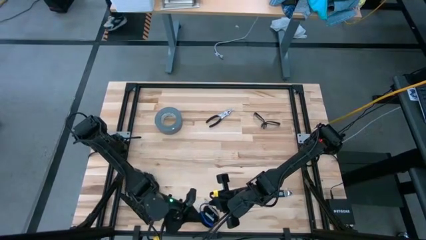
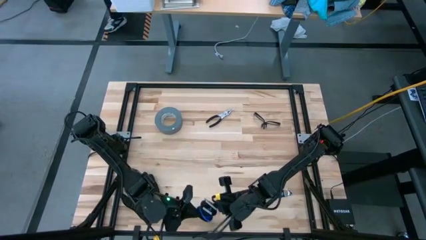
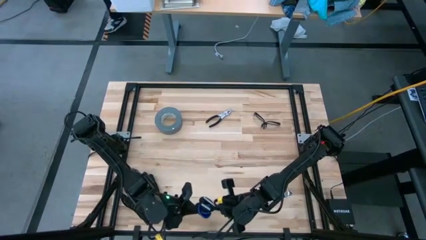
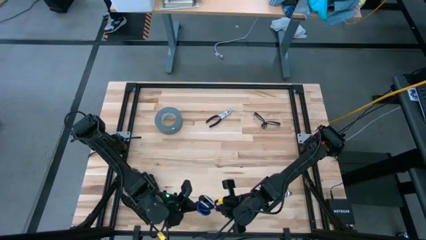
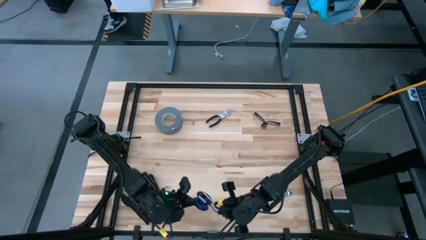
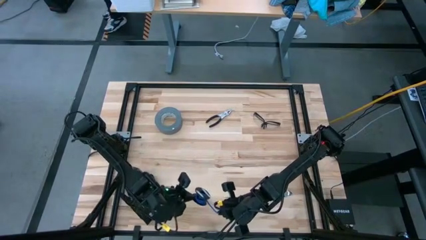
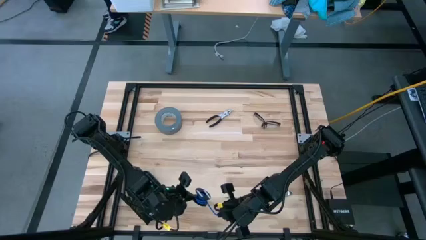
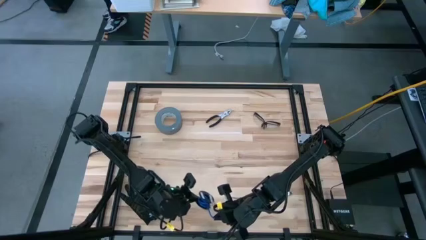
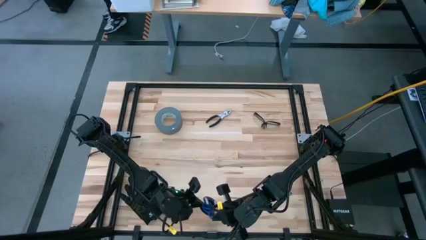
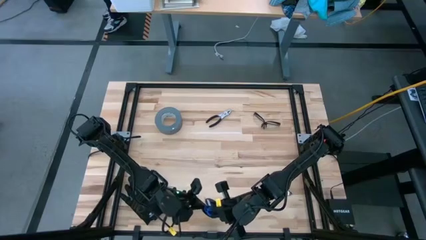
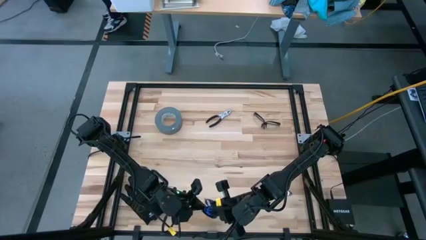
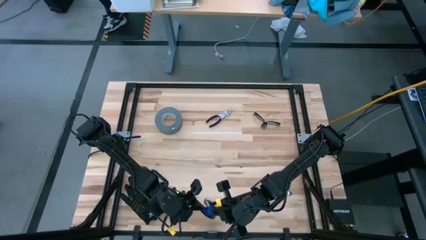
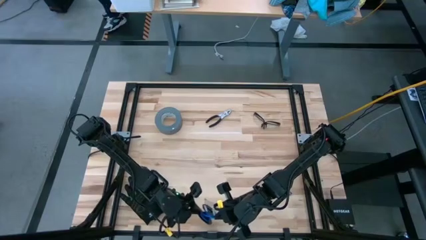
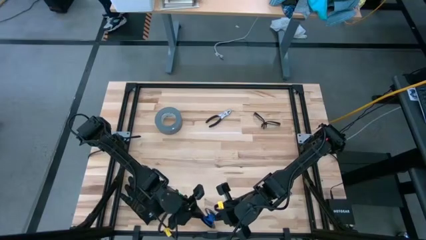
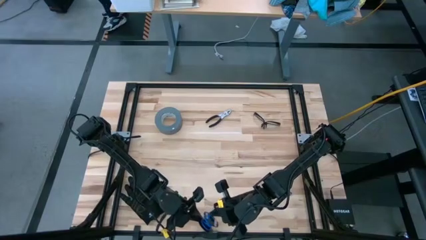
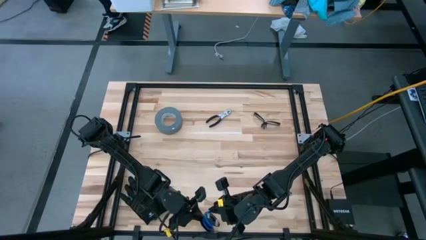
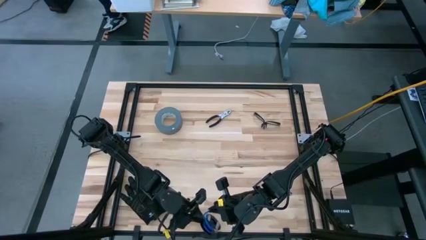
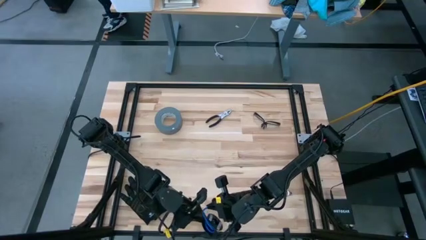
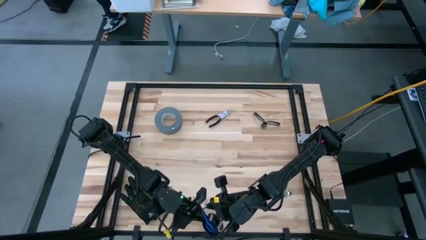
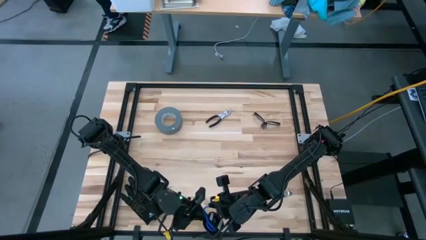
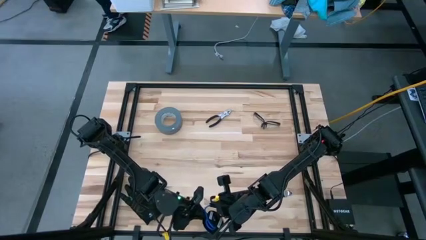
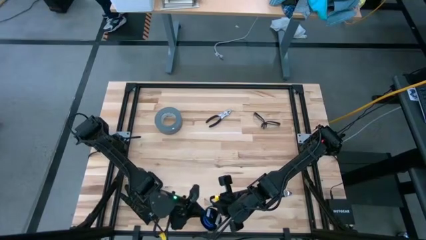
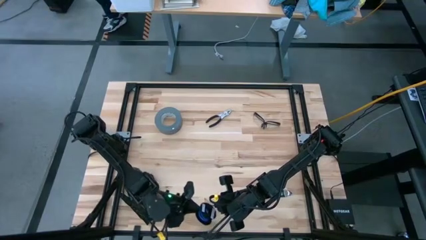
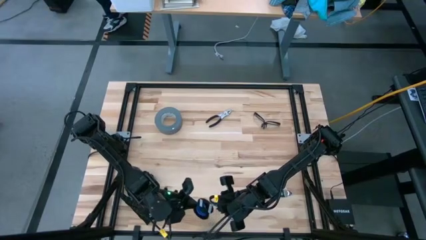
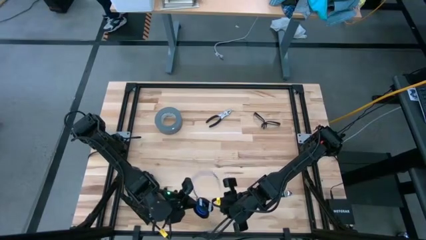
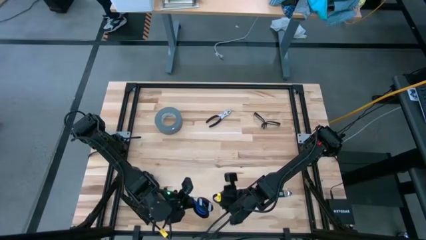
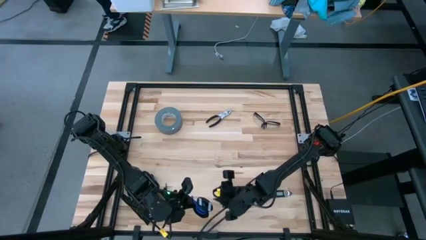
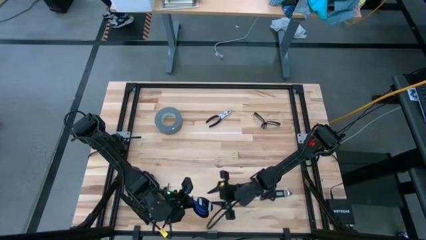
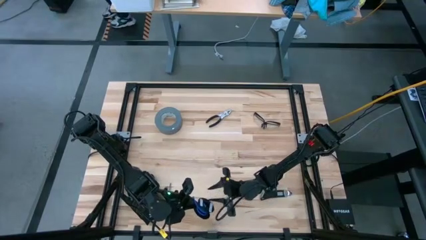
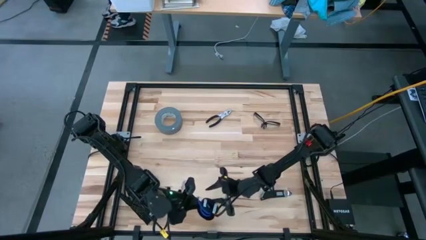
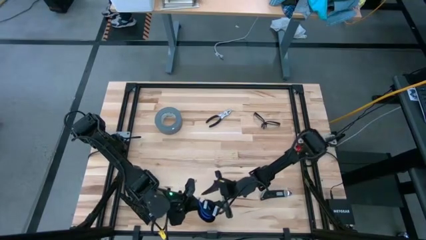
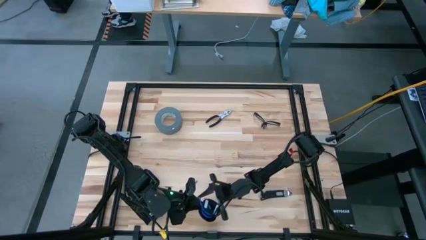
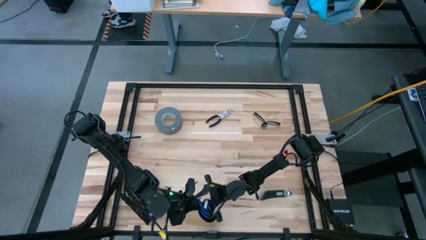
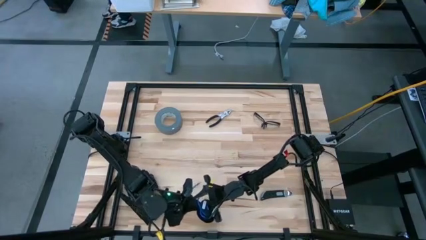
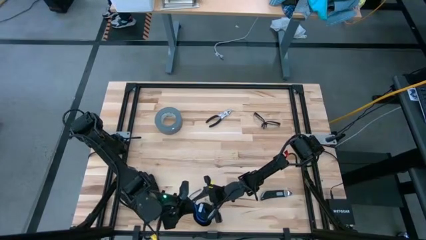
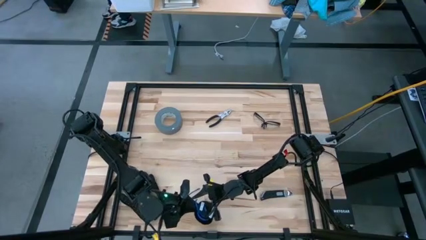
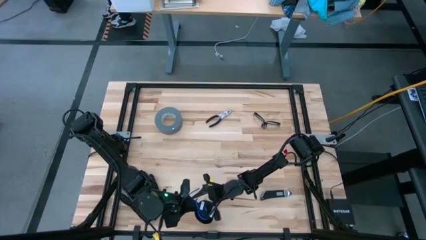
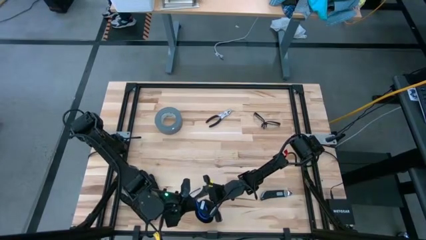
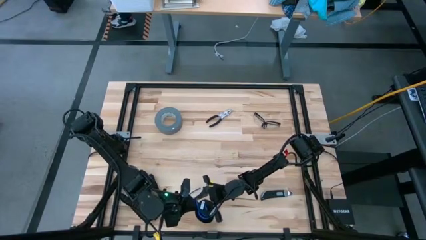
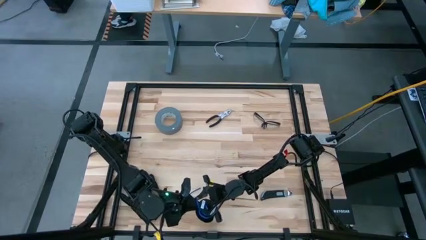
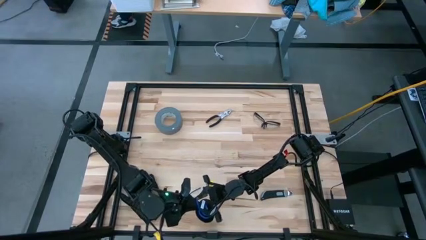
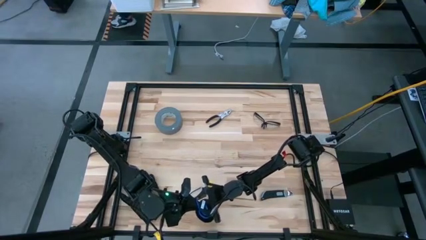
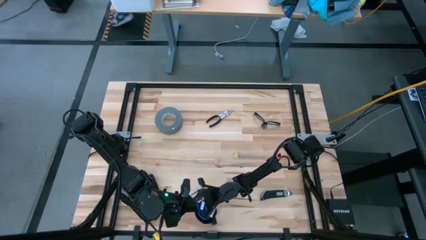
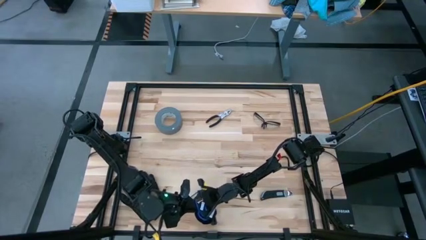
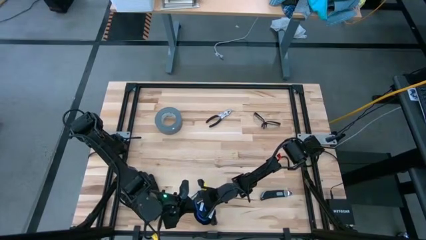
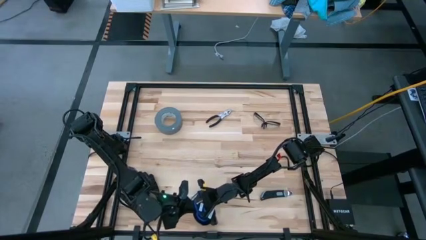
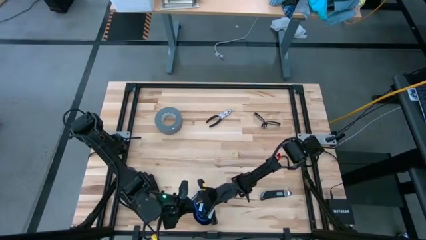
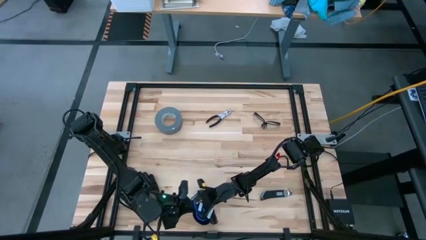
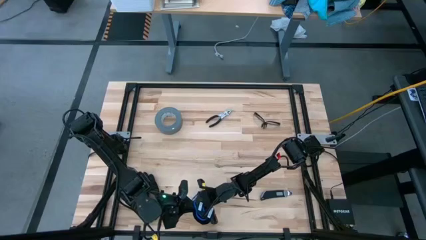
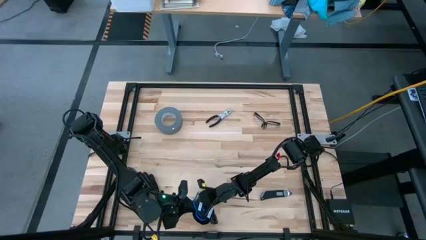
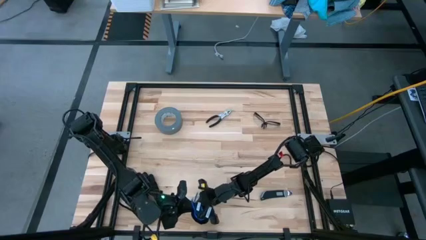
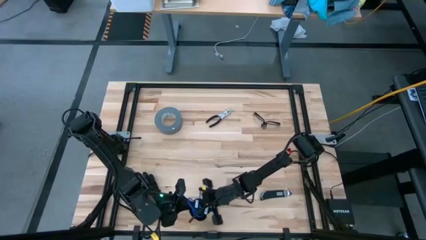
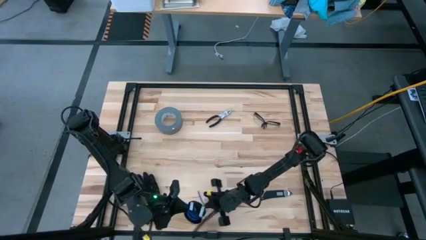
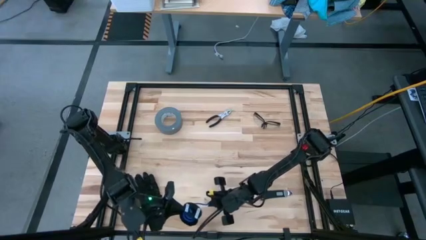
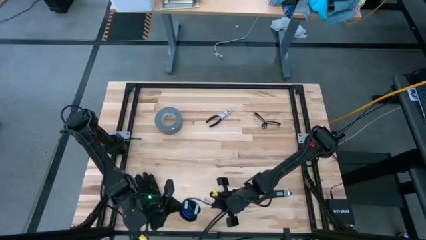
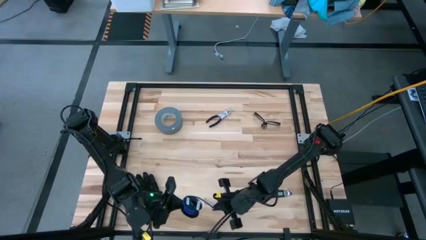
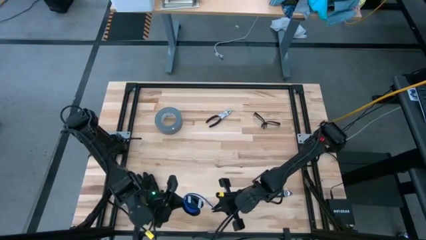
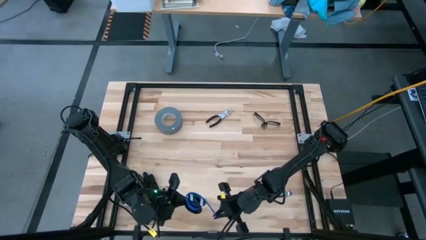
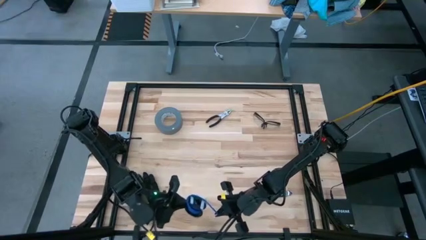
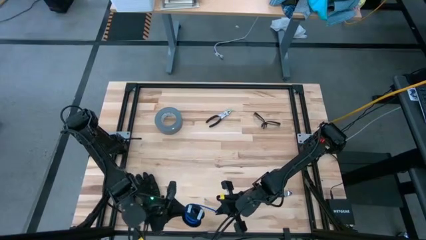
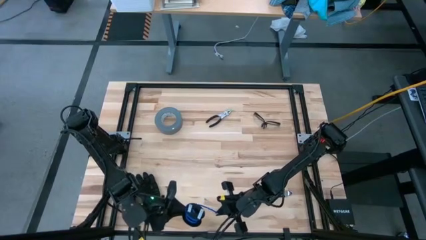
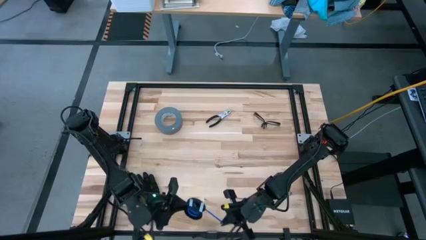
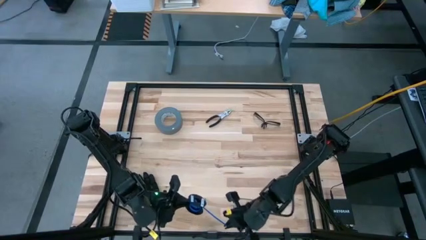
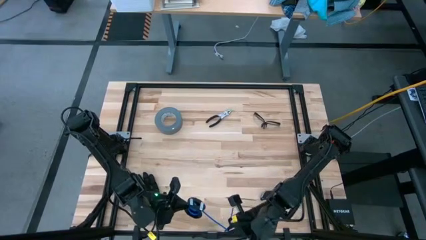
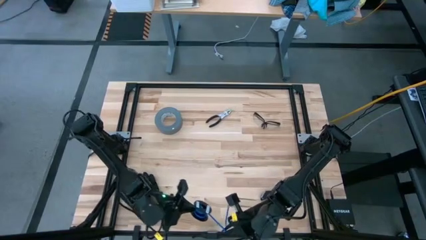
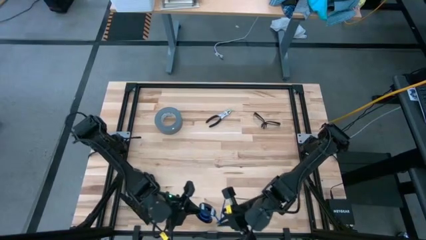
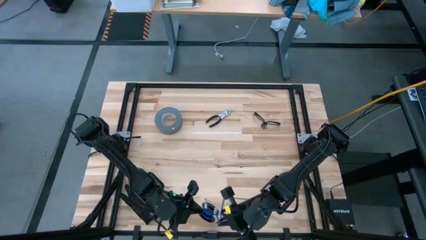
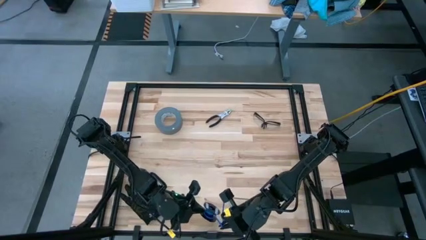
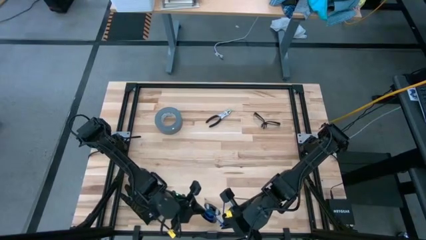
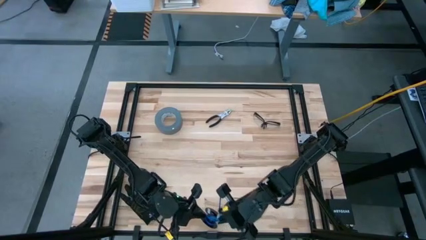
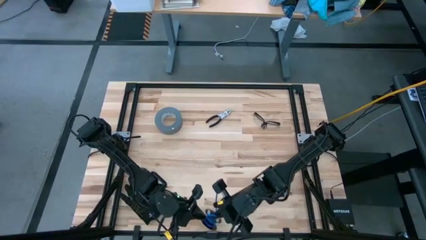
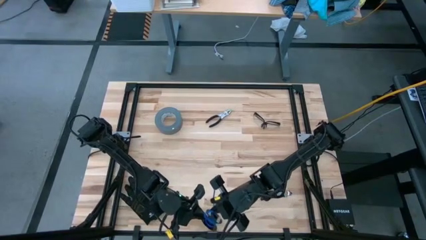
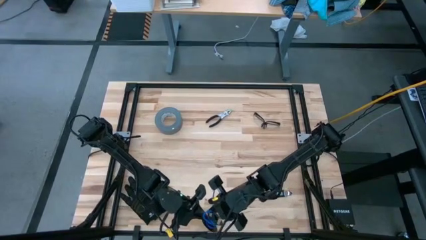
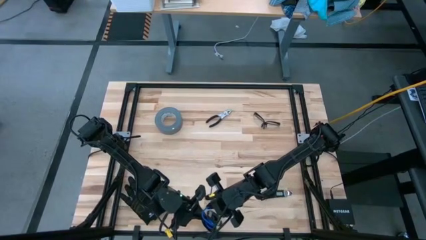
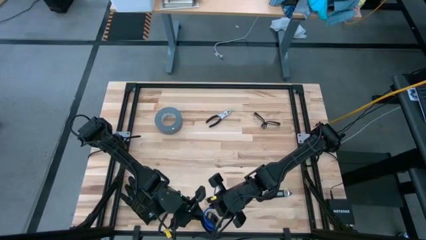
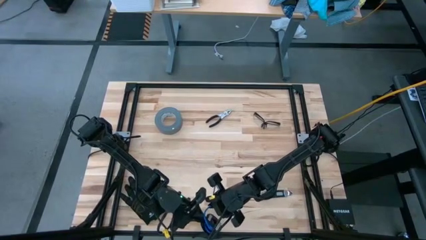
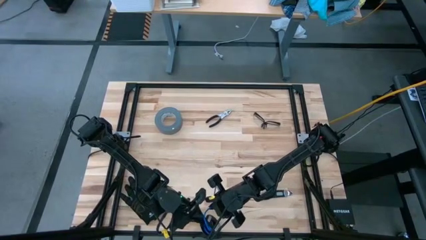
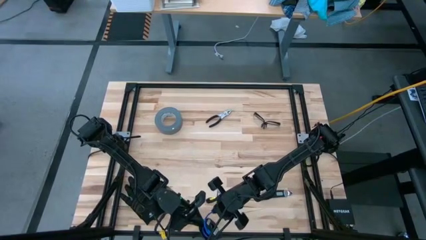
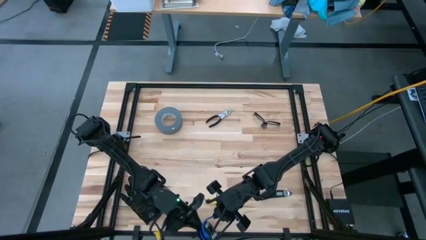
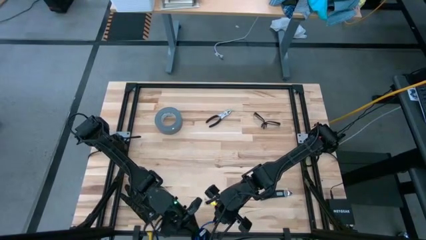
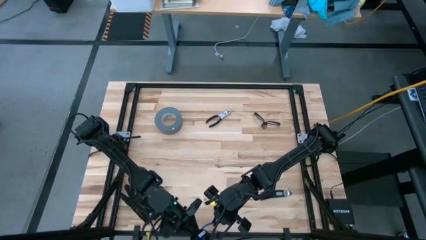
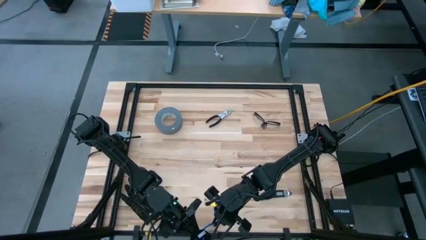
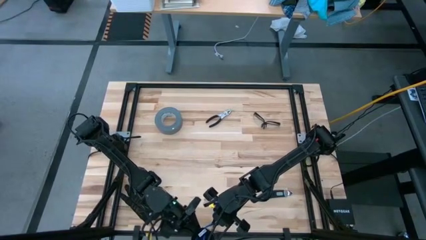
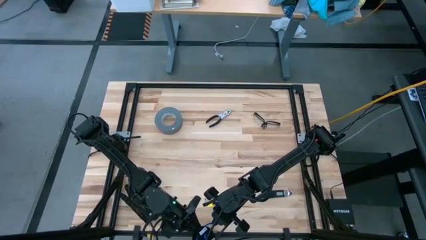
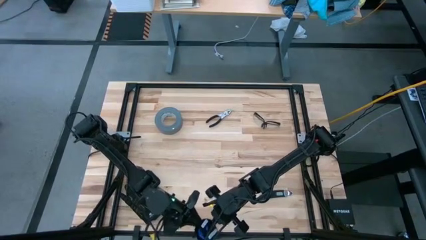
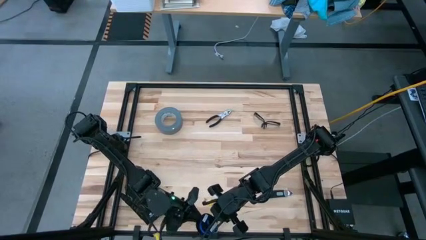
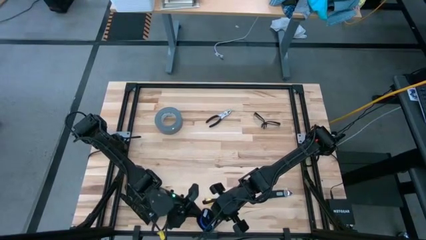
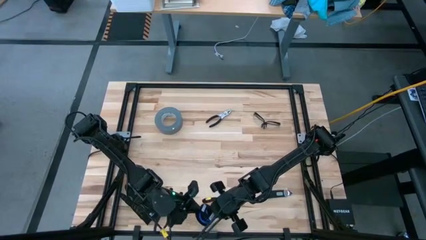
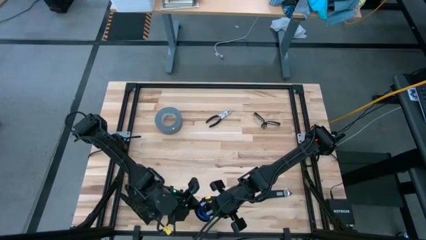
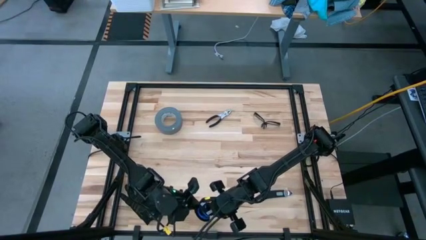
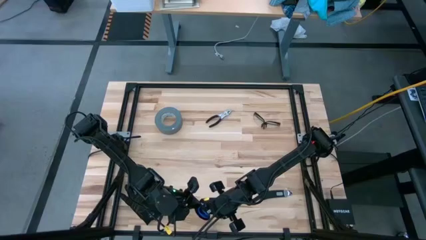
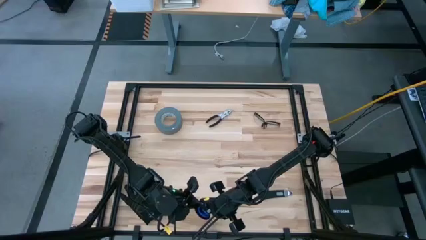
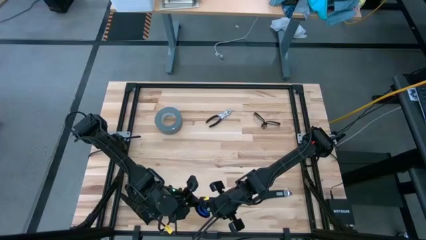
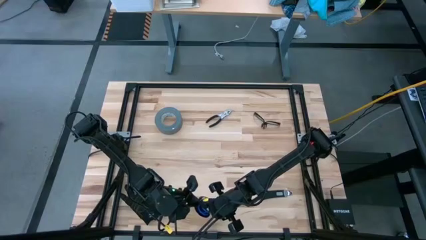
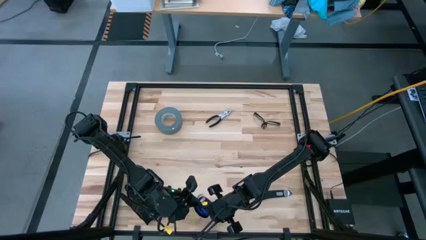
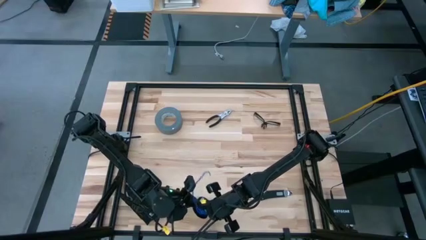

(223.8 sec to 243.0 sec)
Task: Coil cords
Coil the blue wire cable onto the black spool
